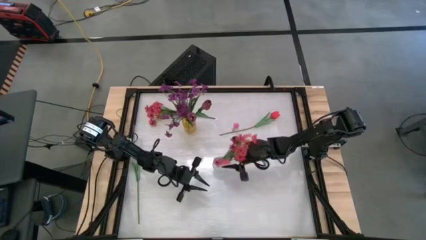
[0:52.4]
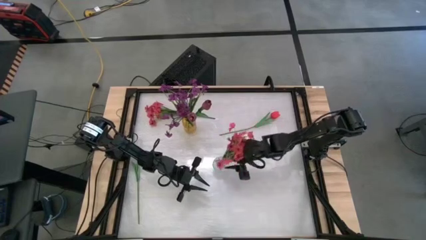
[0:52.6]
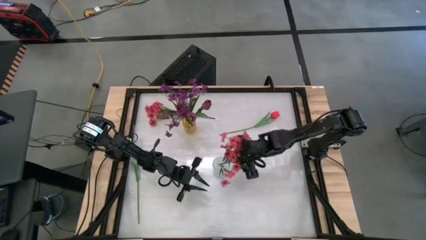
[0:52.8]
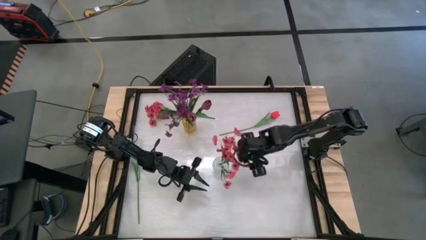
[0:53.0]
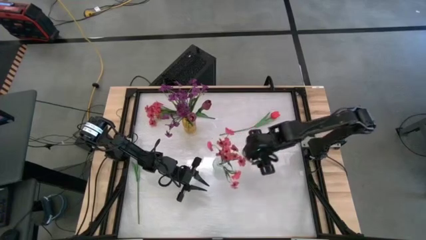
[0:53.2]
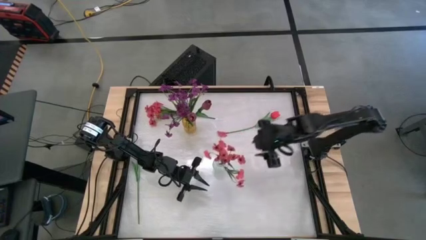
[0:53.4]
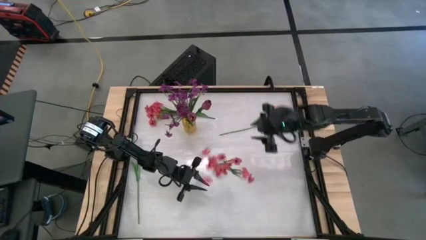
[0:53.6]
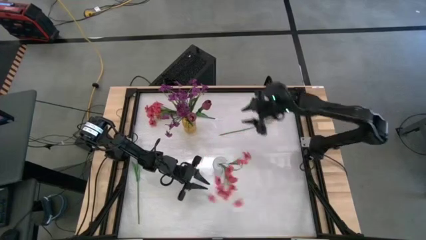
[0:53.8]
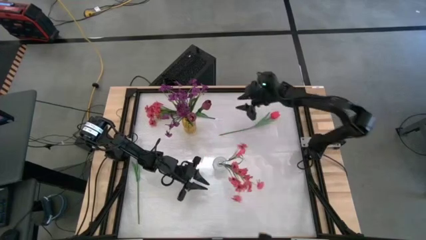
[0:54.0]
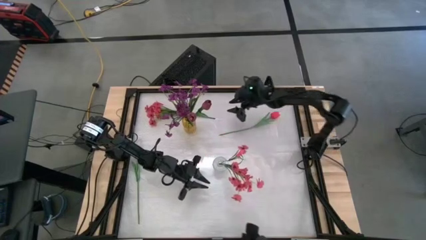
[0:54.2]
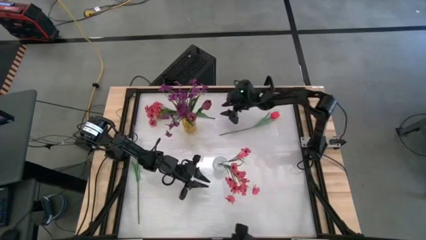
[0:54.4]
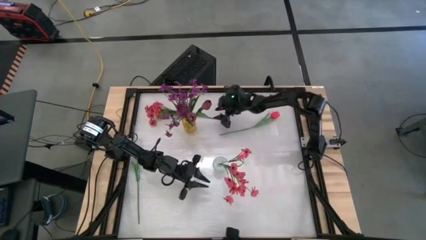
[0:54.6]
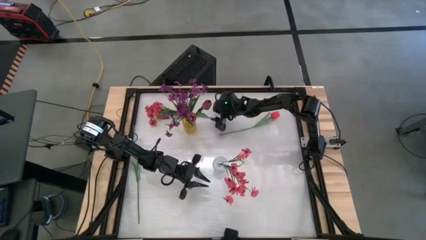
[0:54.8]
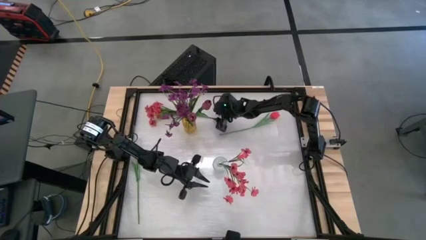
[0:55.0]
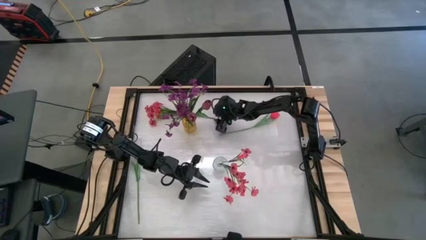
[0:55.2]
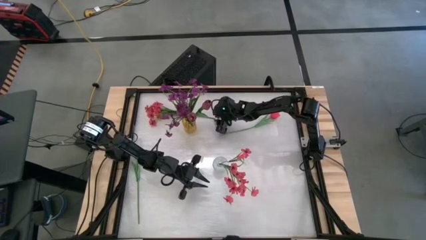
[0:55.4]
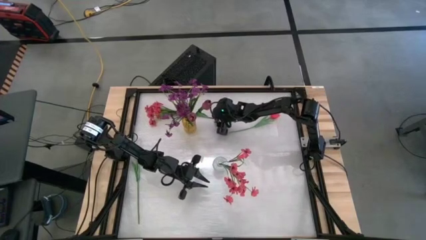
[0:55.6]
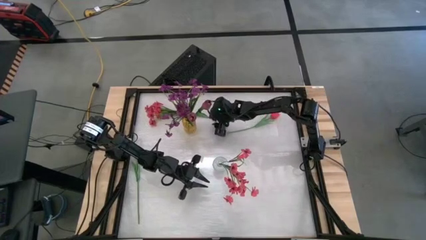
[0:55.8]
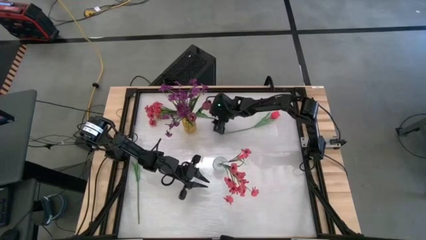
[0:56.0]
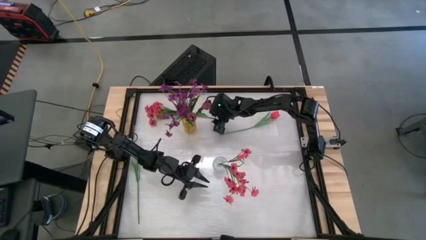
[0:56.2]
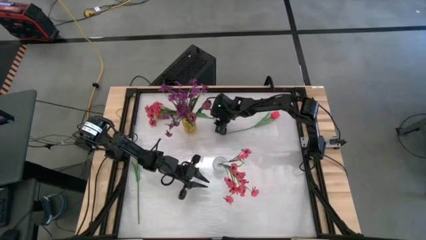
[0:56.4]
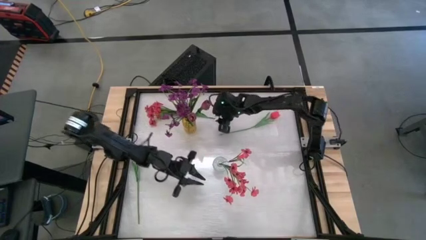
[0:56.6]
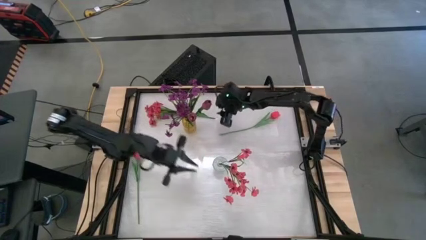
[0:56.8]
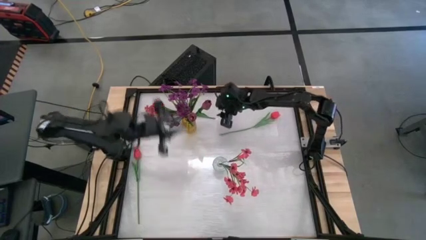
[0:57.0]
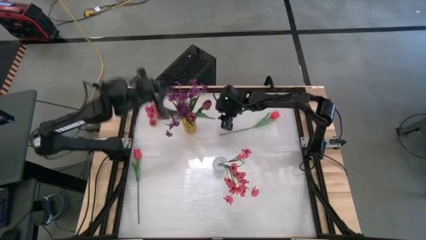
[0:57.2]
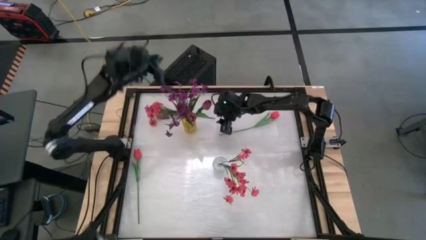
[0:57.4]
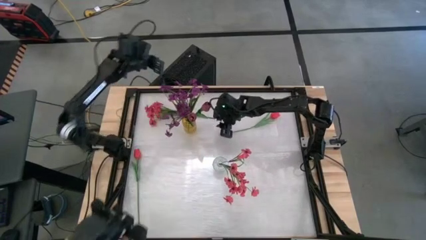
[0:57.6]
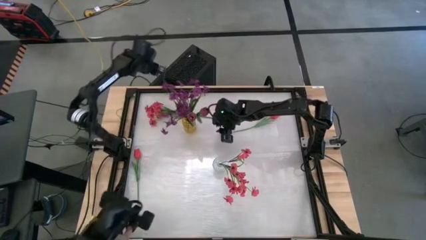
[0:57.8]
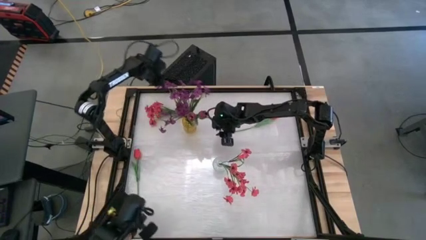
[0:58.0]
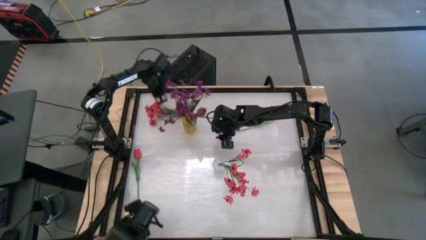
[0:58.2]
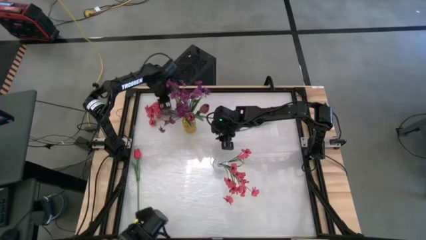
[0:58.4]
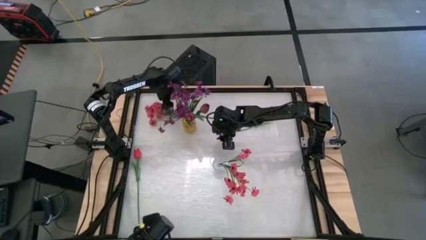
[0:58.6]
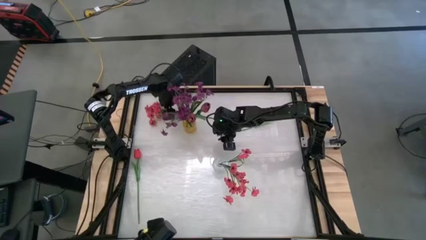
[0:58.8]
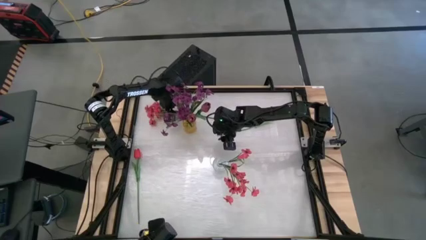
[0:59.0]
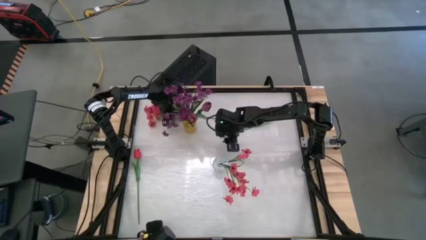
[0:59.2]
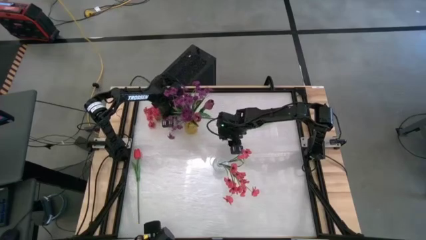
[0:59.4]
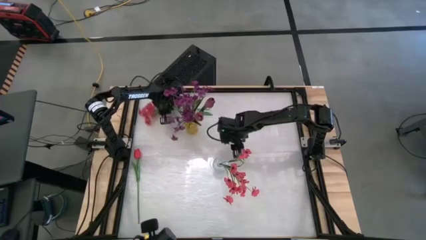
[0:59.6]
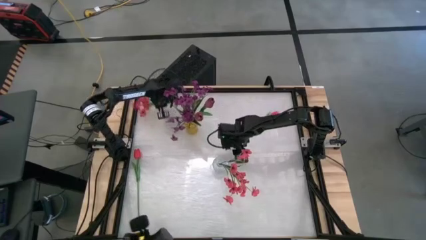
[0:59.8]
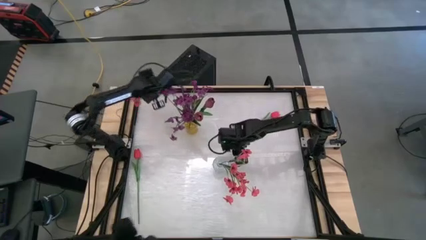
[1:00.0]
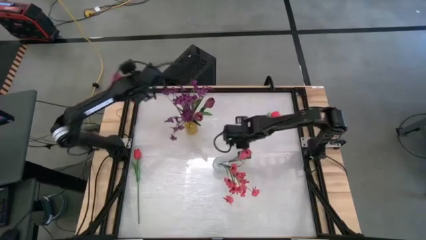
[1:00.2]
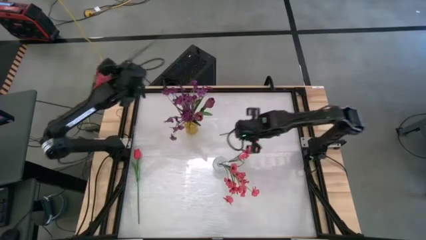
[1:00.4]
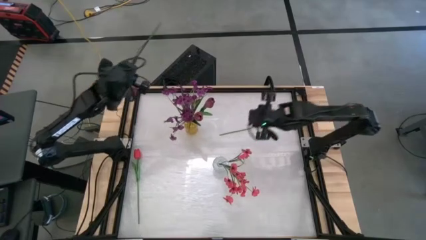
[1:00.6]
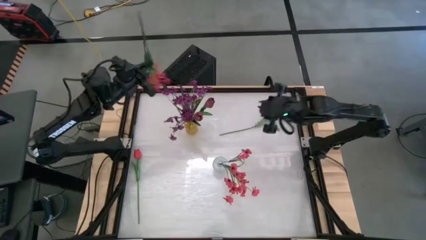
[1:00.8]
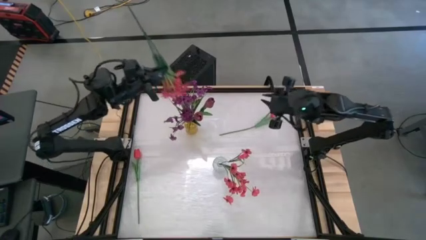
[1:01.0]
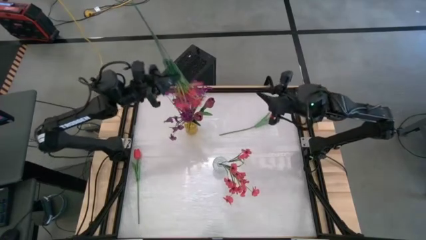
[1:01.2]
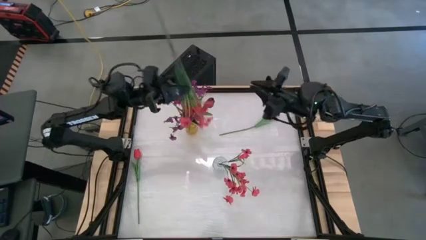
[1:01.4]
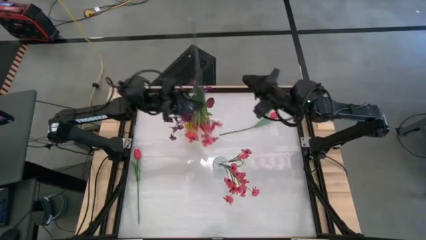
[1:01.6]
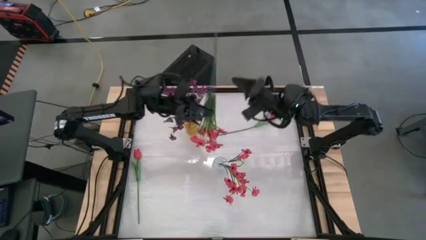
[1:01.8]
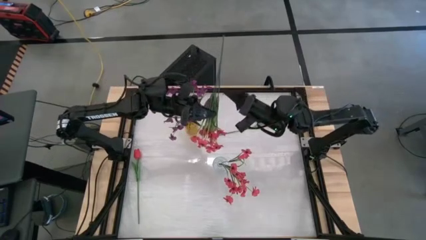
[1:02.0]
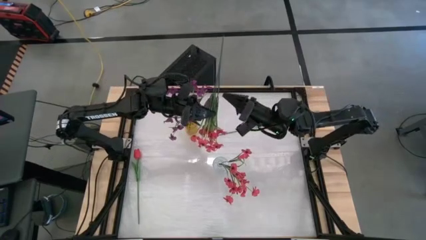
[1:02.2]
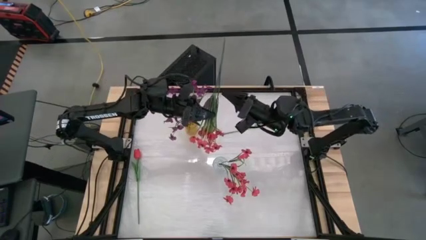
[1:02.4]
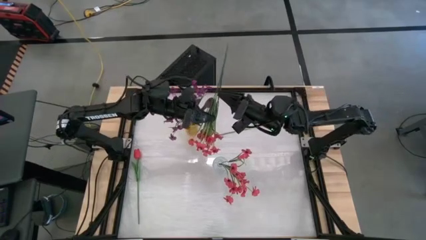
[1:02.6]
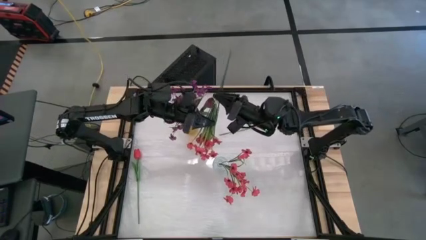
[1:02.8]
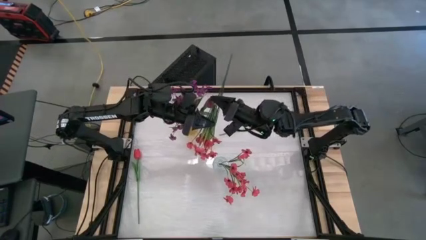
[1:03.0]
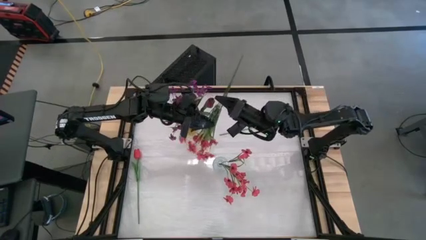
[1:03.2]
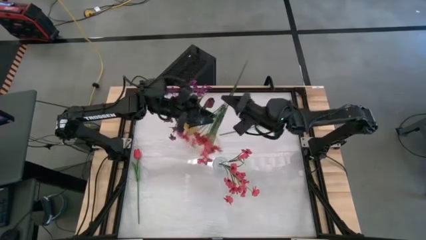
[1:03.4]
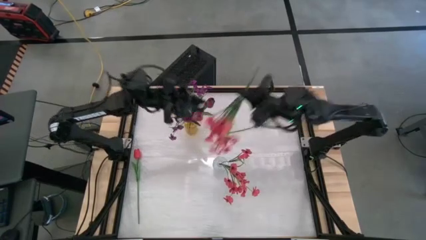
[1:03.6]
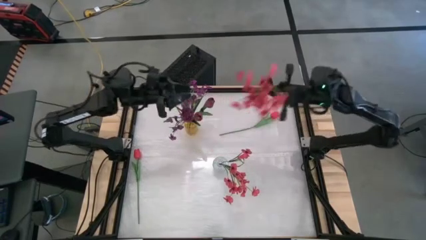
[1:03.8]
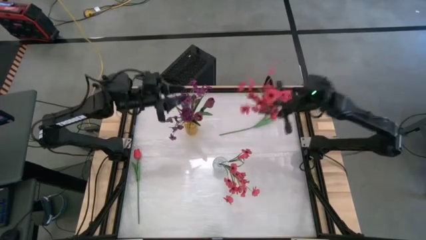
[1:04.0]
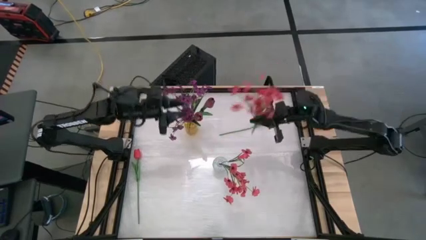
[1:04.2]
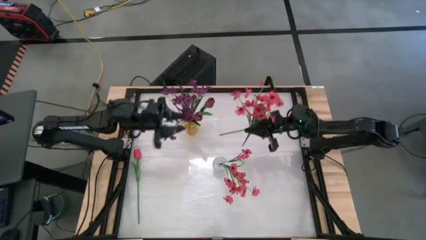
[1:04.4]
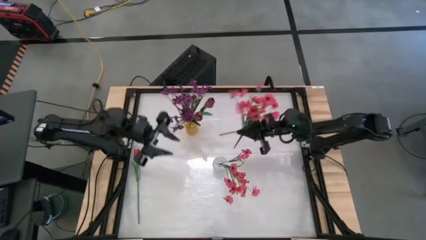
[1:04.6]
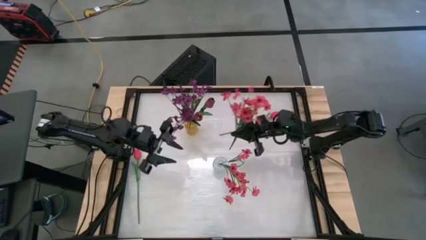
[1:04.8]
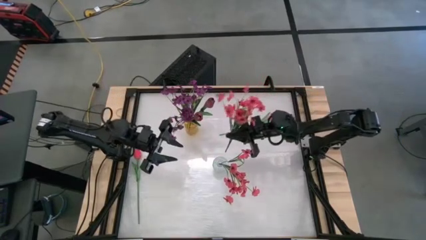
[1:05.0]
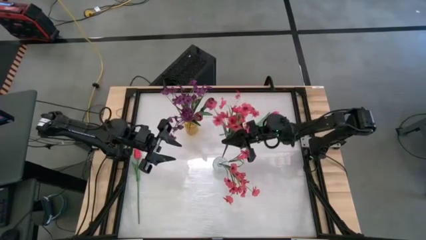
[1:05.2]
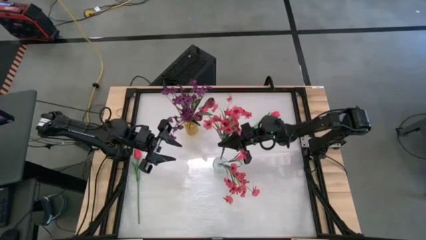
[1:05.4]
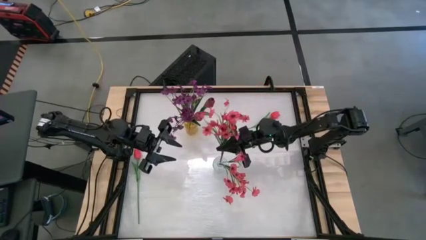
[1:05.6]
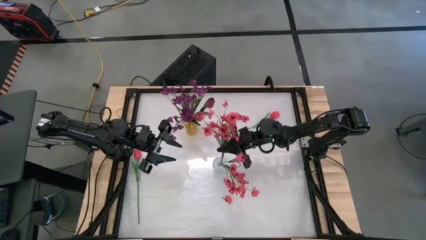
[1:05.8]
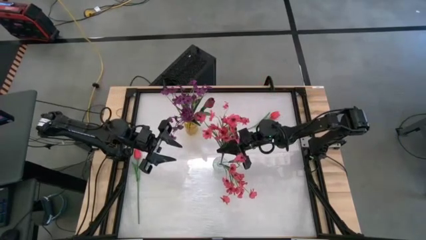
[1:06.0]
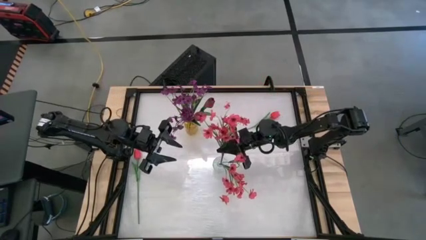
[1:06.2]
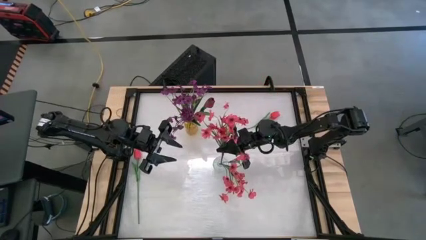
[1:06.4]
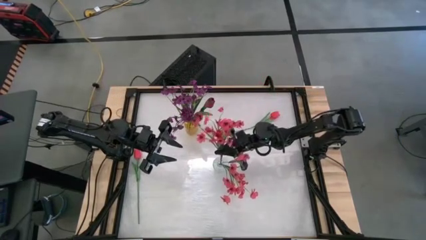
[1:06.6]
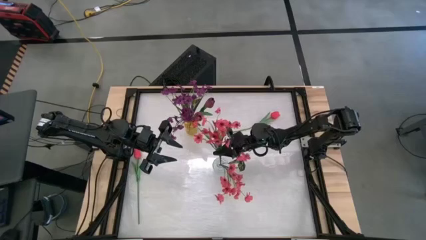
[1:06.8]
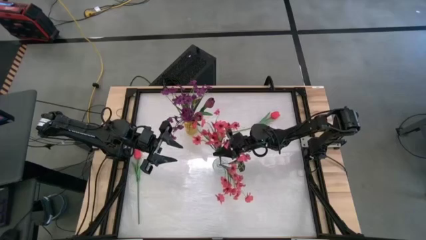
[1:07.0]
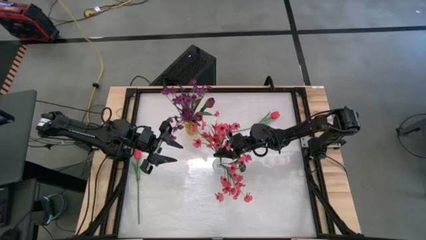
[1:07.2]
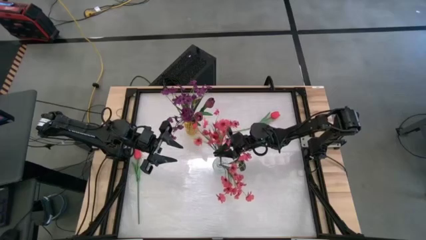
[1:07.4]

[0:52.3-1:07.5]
Task: Sort flowers into vase by color
Put the pink flowers into the transparent vase

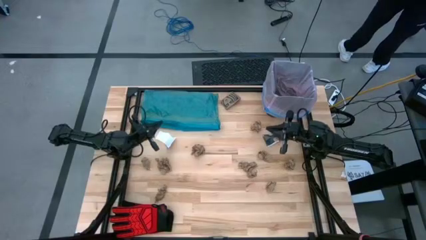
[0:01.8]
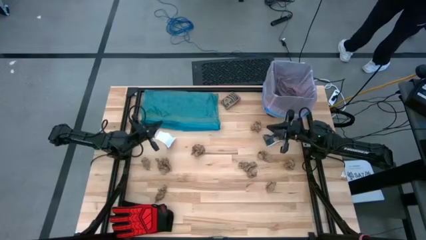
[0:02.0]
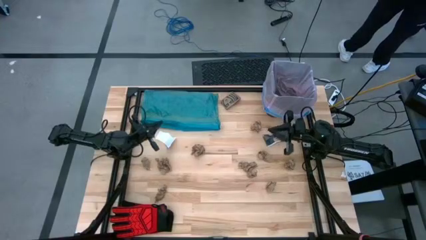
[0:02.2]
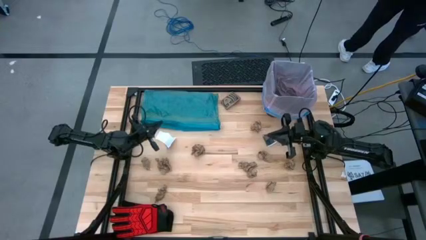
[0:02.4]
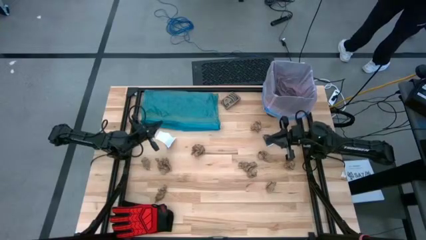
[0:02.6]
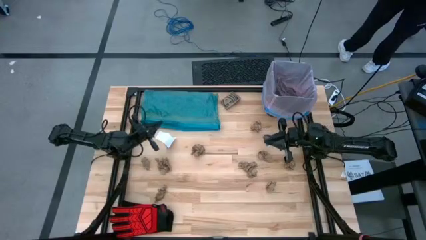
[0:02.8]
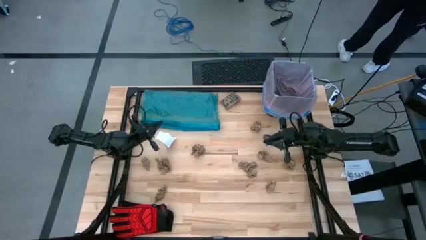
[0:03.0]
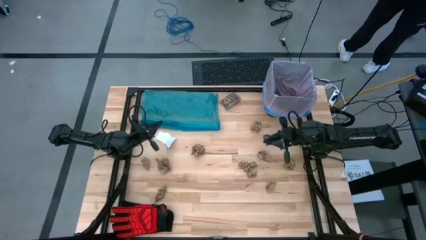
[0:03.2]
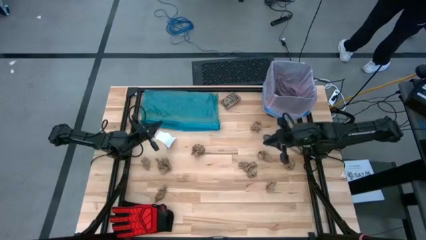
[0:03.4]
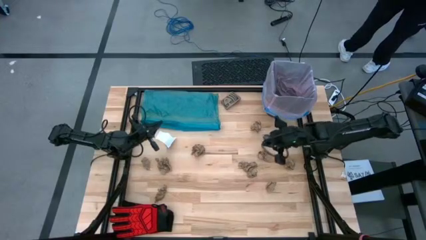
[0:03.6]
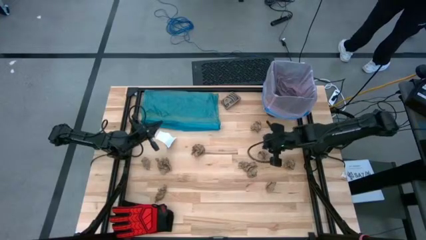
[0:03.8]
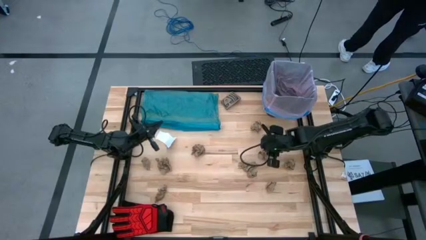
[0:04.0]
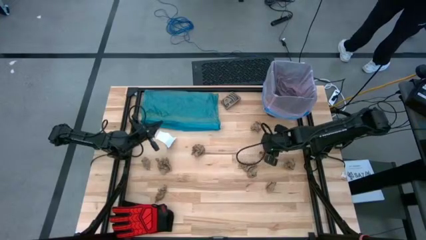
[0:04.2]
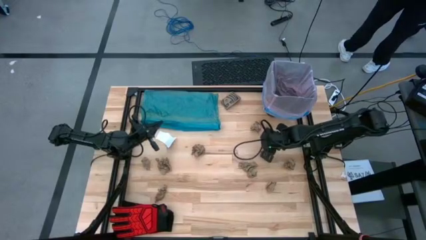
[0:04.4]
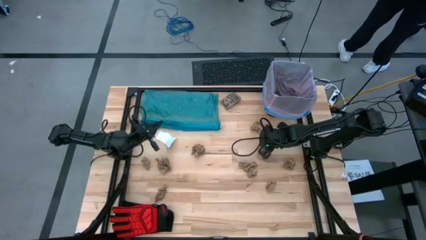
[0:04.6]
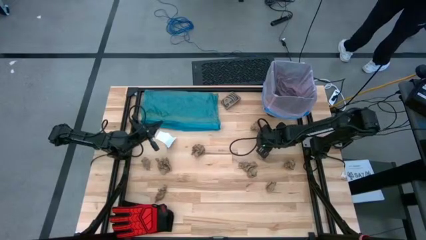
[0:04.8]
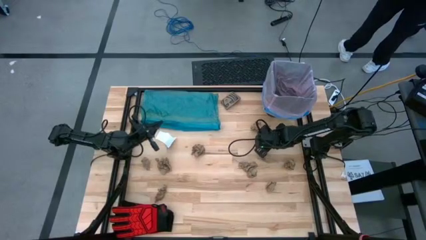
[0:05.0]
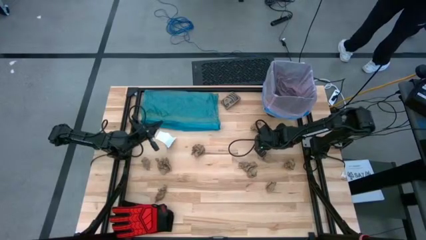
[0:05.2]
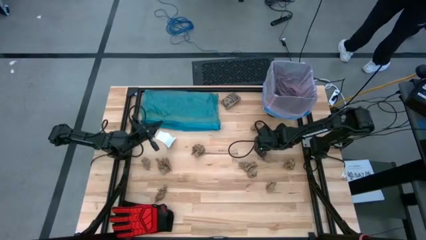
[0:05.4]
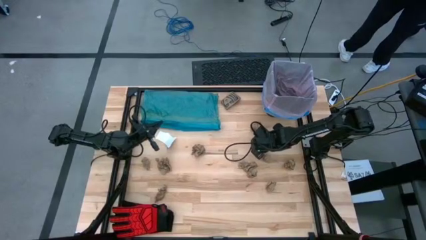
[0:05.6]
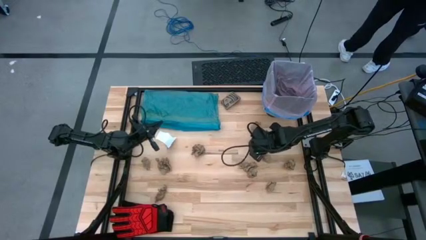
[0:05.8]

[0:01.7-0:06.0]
Task: place trash/remove bag and relplace
Put the black paper into the trash bin
